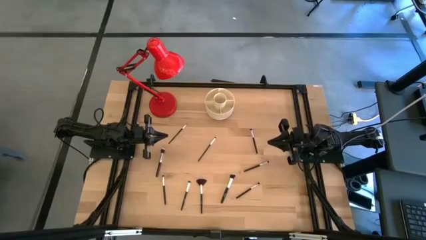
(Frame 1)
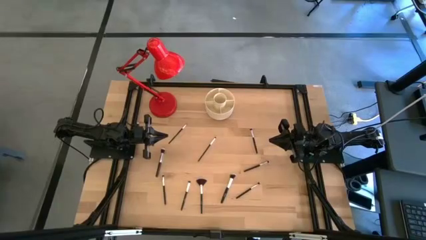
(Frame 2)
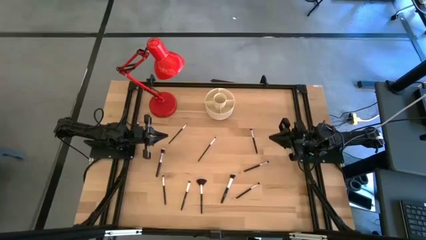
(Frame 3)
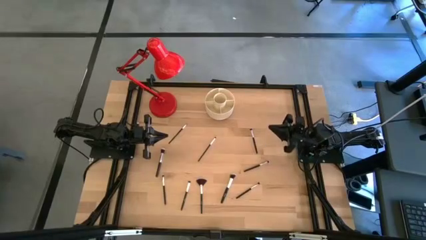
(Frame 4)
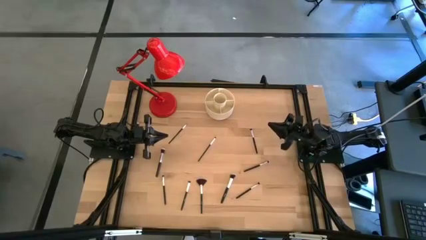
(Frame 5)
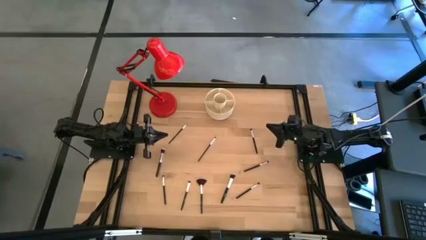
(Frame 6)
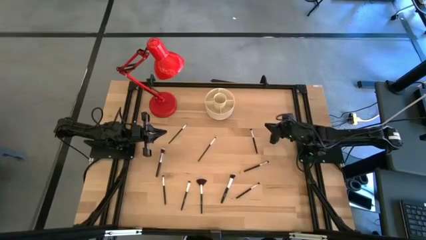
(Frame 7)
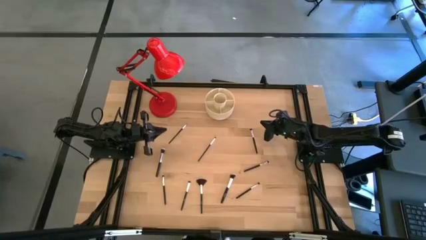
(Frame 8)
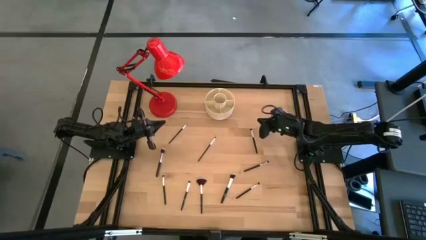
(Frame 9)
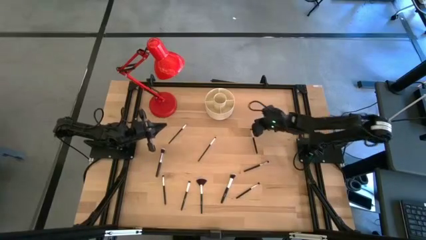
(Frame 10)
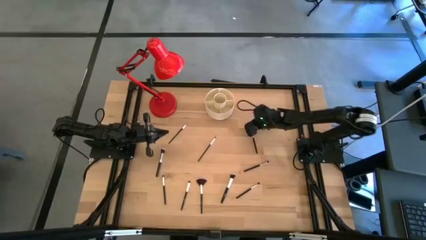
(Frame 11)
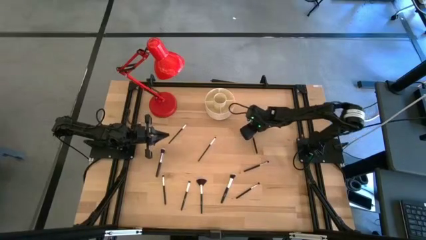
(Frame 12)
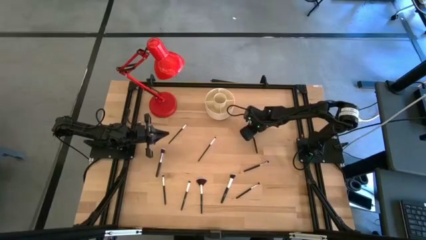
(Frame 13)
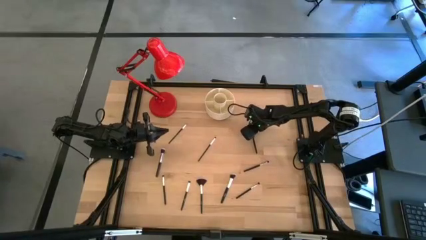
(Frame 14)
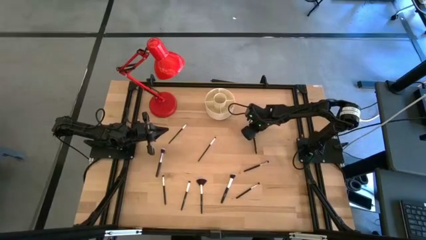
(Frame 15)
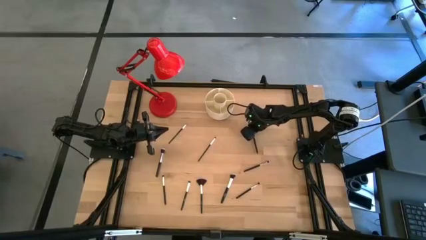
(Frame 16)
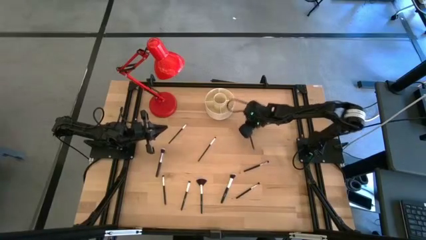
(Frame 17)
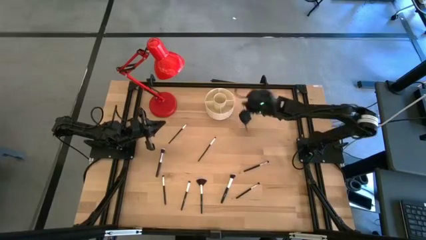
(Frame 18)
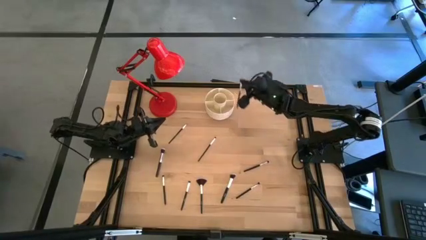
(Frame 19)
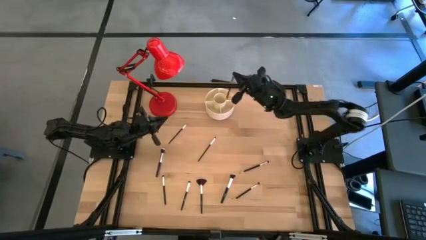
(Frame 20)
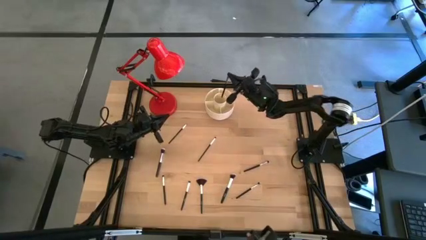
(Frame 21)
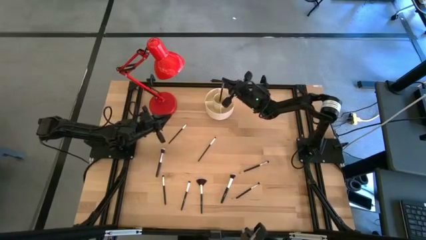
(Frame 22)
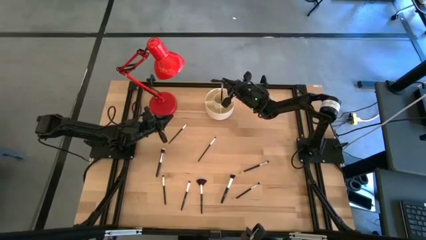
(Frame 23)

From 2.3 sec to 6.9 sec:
Task: Put items in baskets/containers
Put the black eyeshadow brush into the white organizer

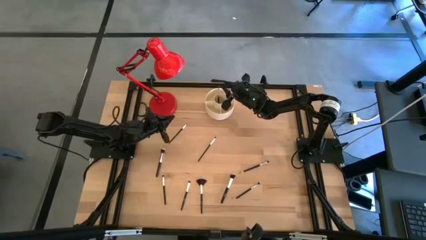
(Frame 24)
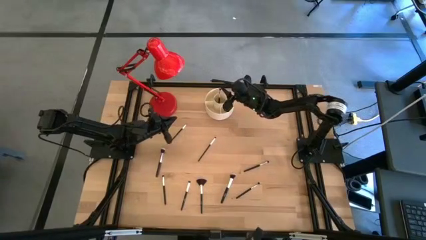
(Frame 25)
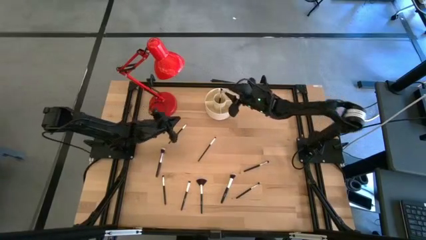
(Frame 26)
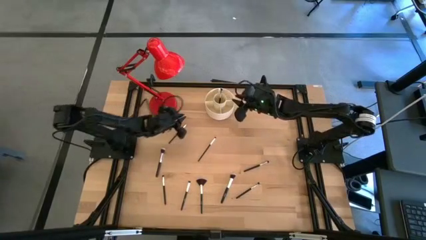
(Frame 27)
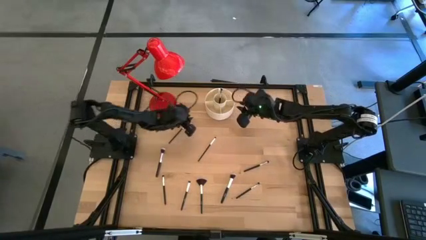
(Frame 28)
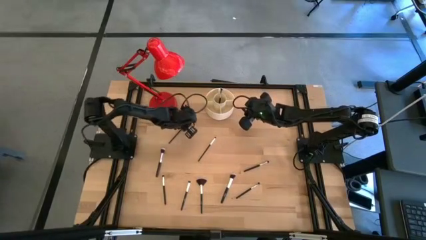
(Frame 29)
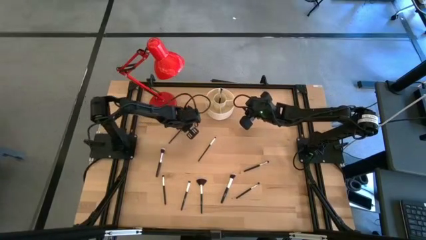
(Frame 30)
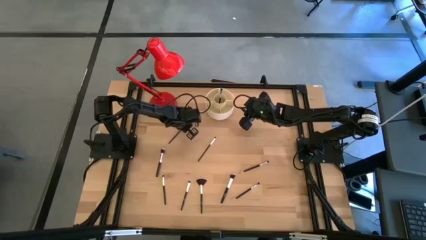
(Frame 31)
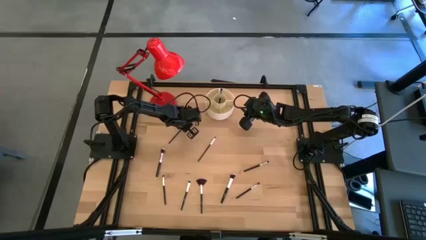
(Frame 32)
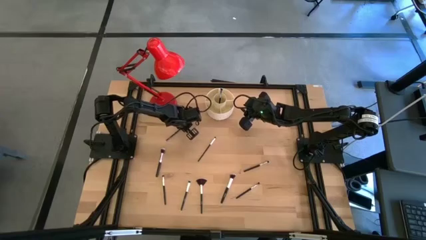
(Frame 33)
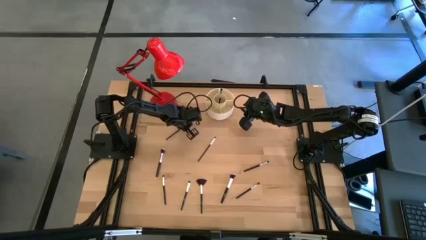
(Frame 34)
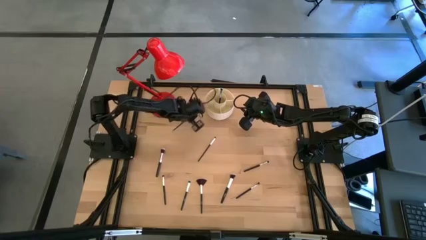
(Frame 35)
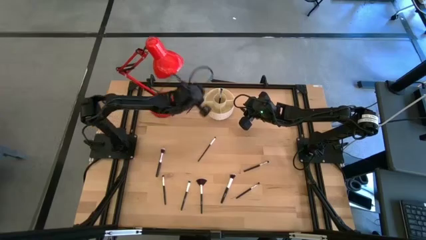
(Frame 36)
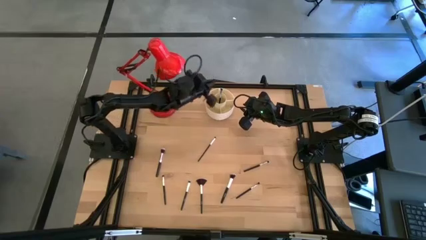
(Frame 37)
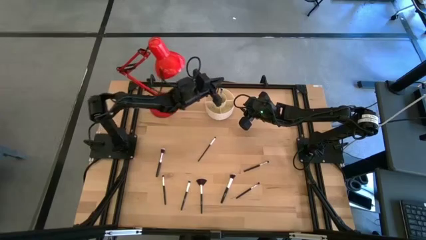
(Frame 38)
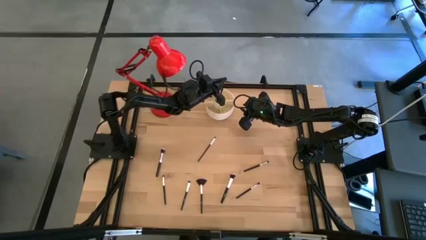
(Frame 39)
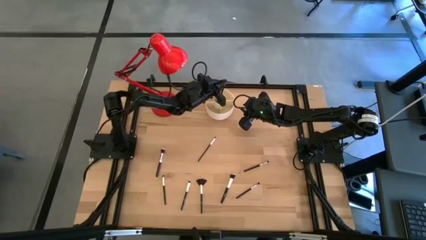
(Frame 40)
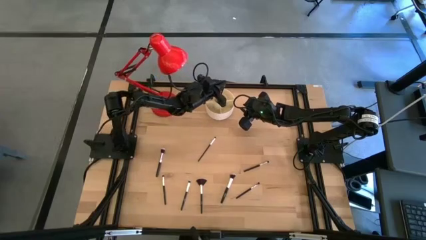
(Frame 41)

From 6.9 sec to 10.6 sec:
Put the black eyeshadow brush into the white organizer

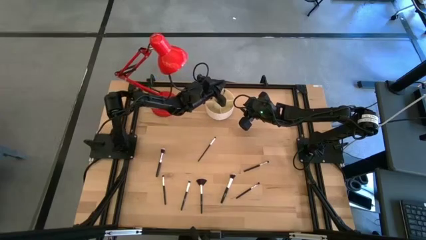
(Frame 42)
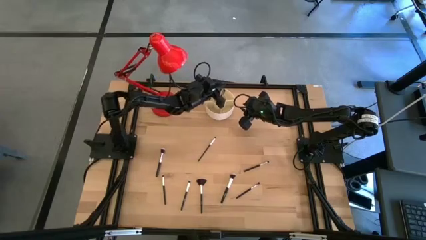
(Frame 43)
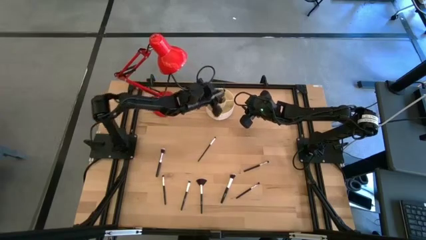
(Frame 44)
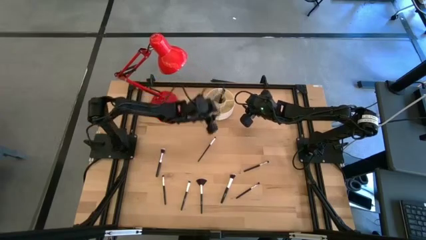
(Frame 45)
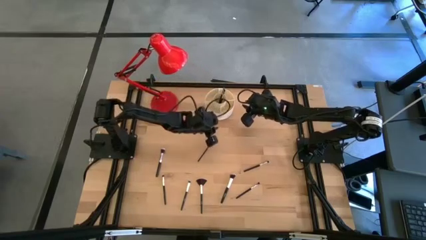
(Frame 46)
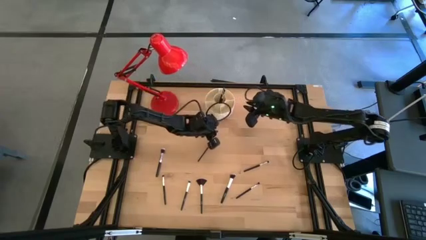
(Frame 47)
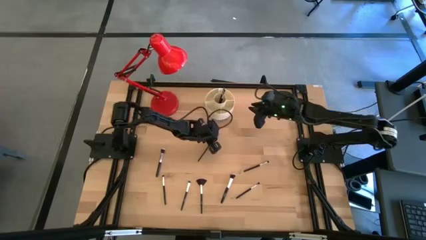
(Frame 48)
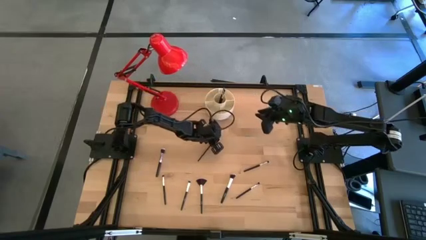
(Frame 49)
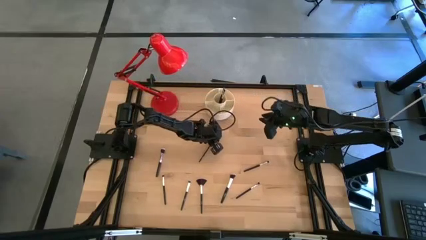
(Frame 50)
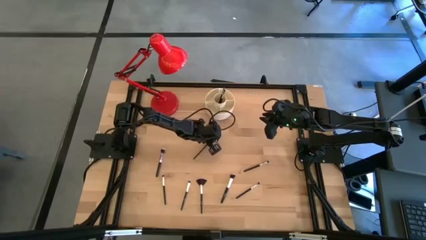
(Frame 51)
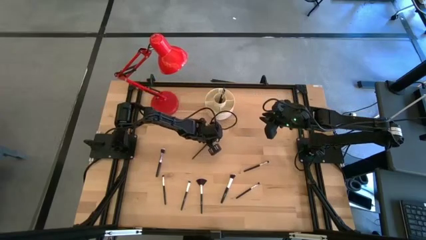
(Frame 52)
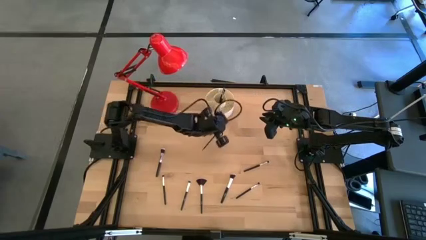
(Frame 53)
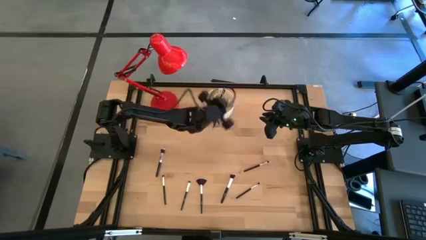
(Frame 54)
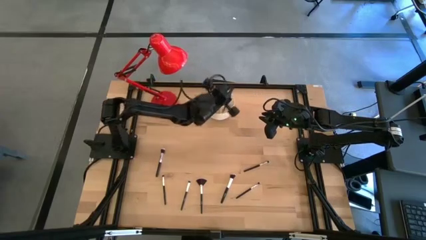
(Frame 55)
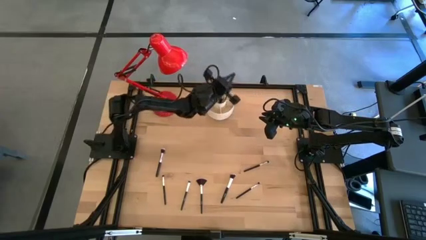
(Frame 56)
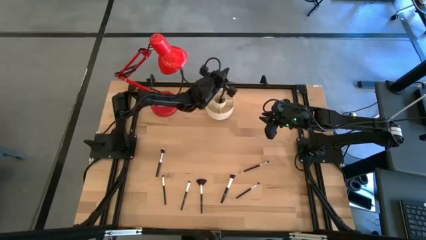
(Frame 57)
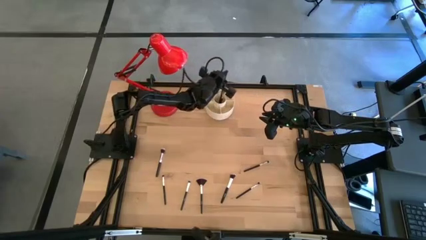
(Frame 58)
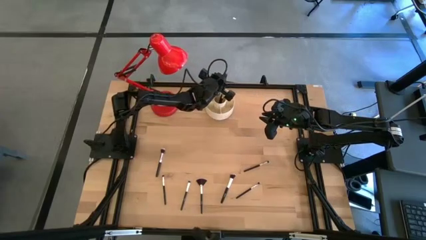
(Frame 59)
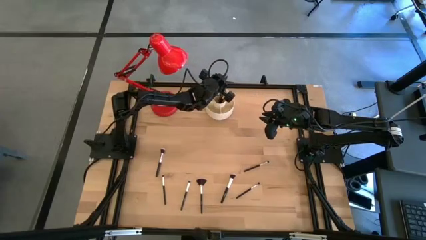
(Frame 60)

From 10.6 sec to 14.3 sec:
Put the black eyeshadow brush into the white organizer

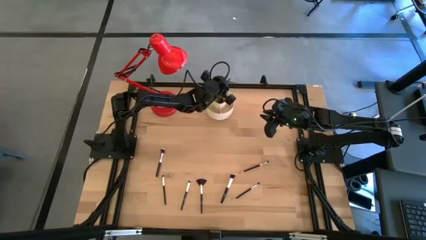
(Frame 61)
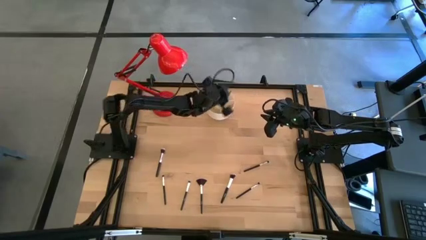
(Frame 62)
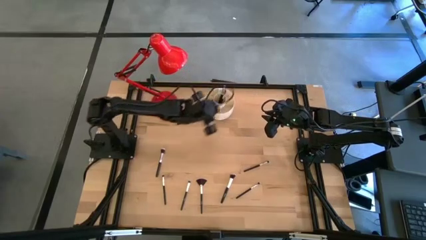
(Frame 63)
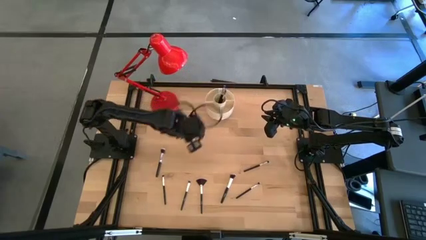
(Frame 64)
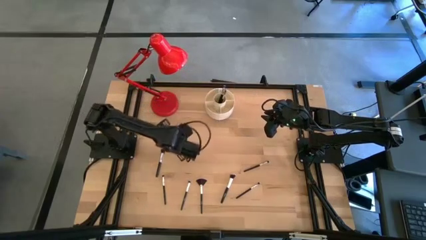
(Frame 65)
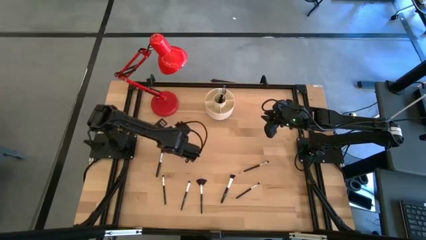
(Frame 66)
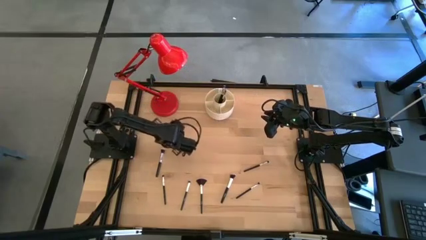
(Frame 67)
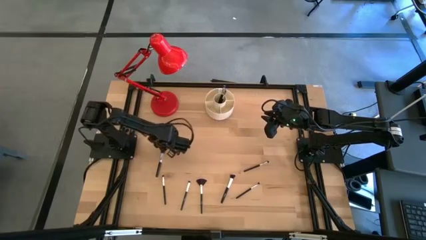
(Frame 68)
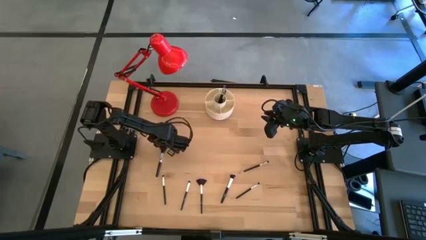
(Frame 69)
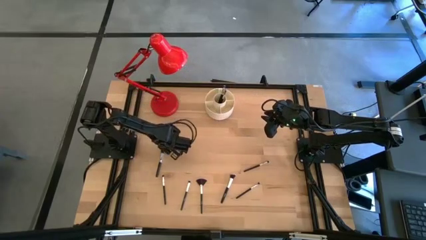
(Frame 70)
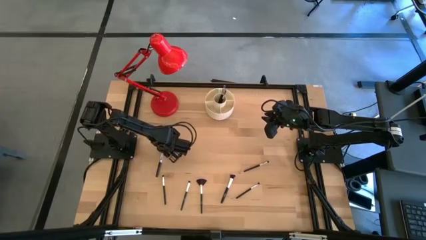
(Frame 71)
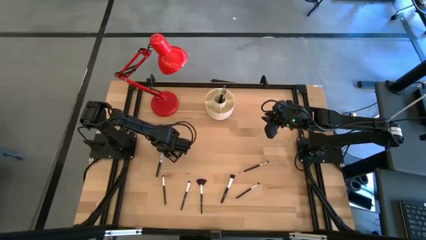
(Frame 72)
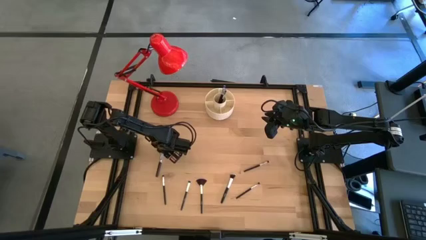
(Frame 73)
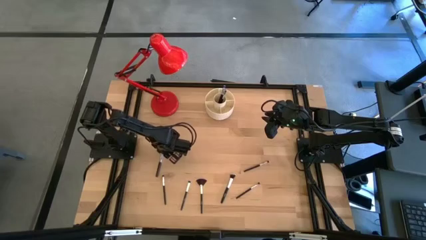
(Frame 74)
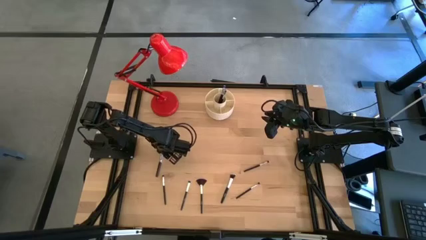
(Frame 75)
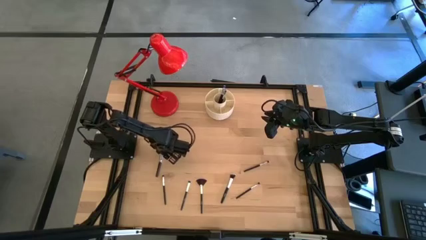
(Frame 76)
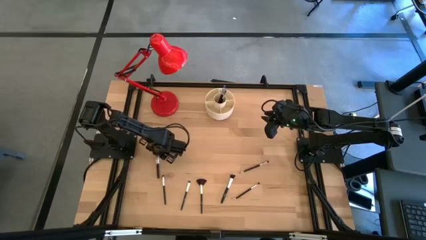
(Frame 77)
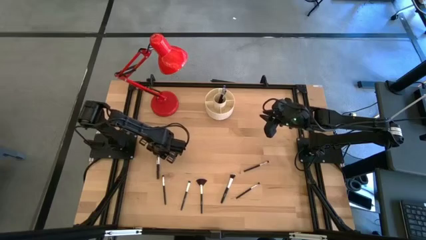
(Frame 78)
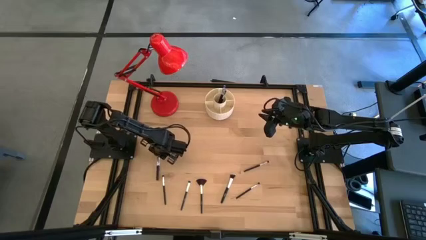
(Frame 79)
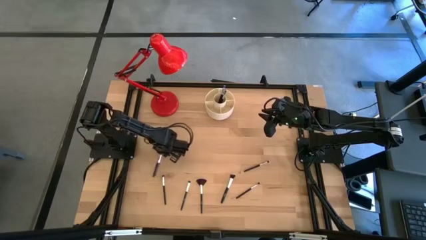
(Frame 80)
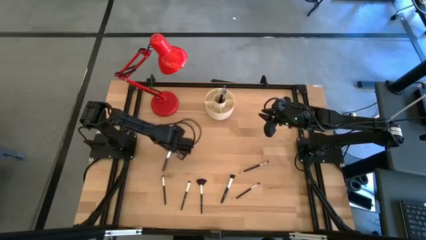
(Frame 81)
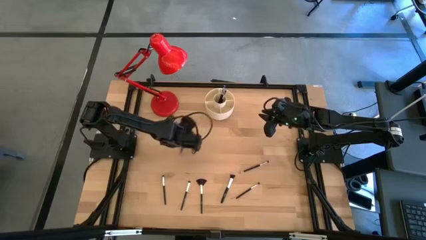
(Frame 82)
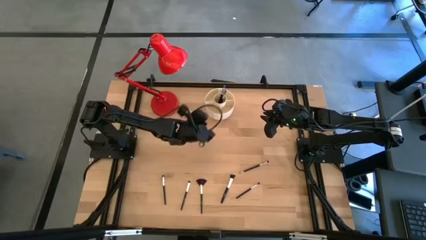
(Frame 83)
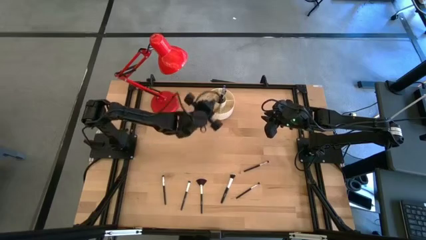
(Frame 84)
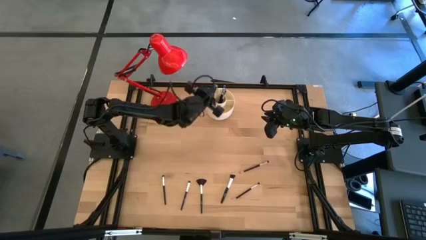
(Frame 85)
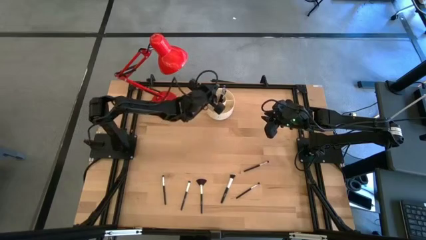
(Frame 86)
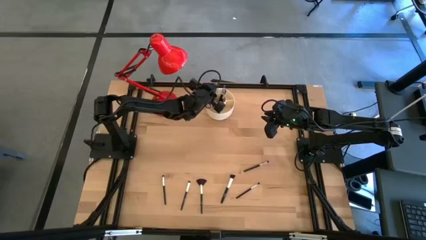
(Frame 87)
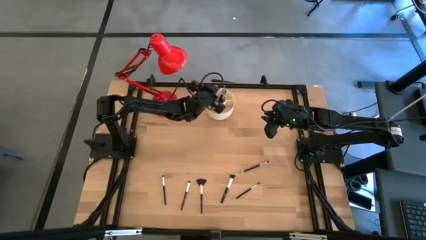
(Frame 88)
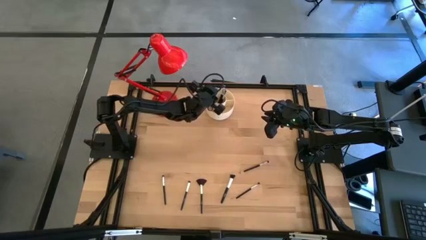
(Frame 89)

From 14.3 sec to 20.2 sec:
Put the black powder brush into the white organizer
